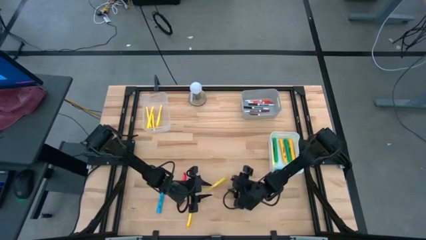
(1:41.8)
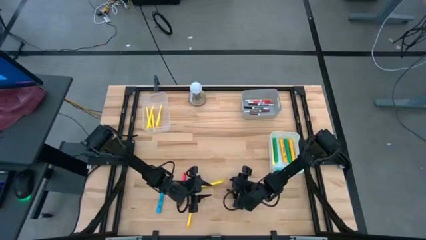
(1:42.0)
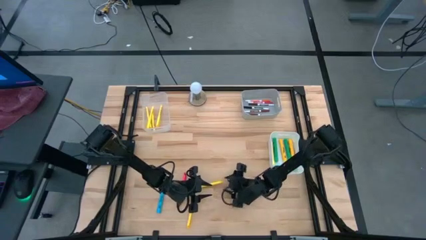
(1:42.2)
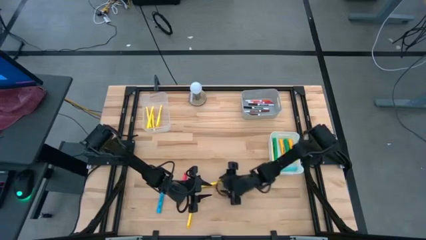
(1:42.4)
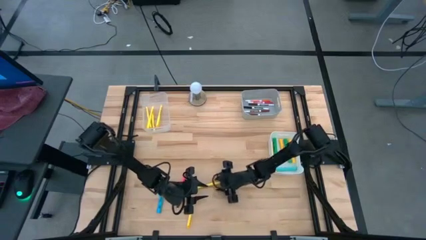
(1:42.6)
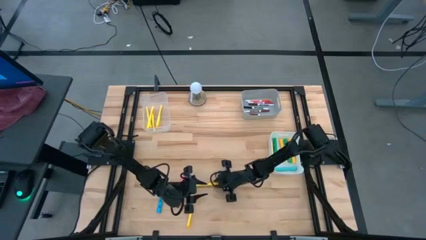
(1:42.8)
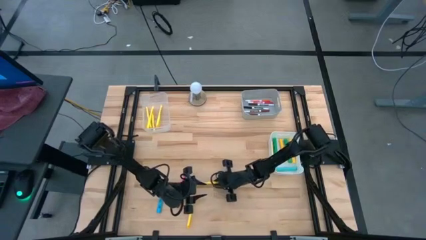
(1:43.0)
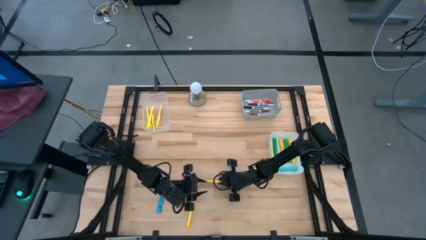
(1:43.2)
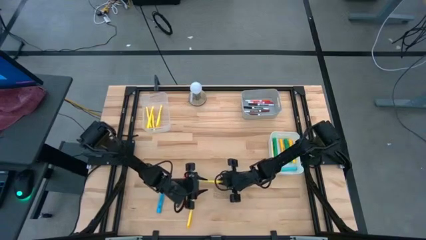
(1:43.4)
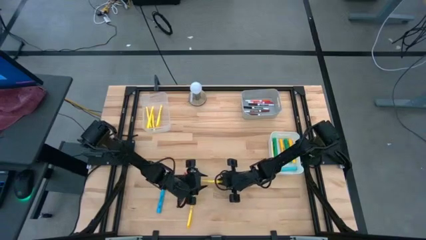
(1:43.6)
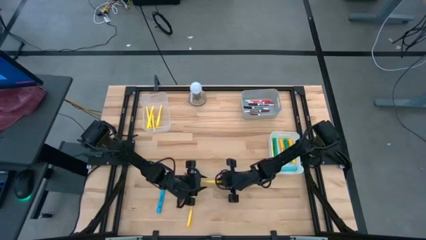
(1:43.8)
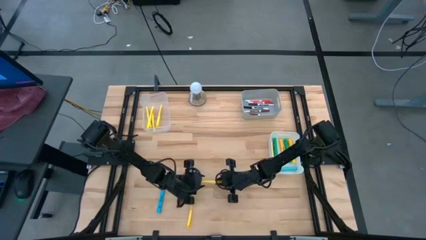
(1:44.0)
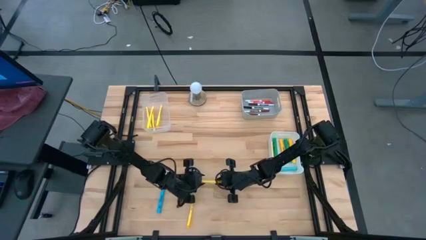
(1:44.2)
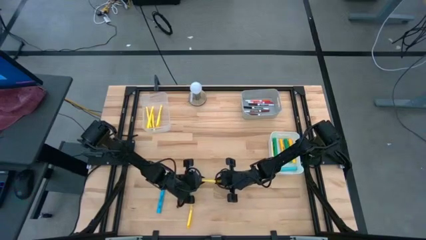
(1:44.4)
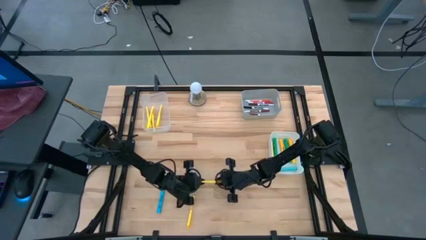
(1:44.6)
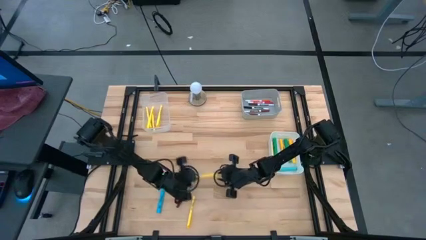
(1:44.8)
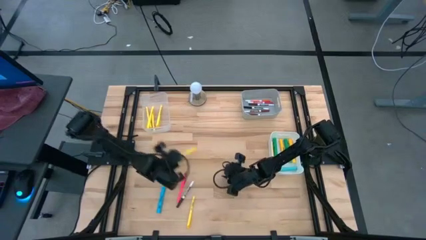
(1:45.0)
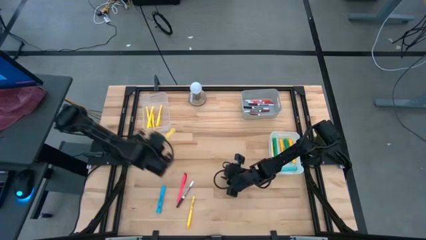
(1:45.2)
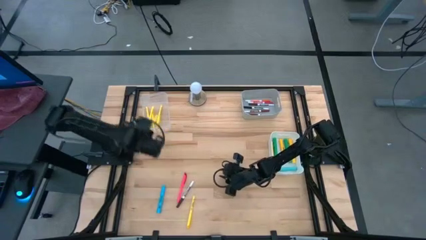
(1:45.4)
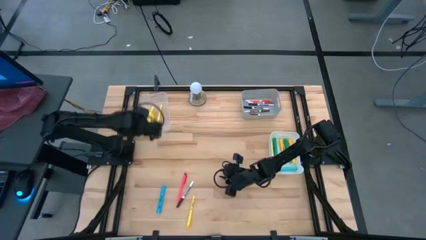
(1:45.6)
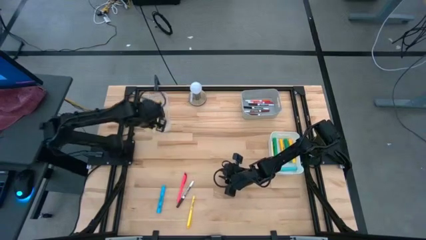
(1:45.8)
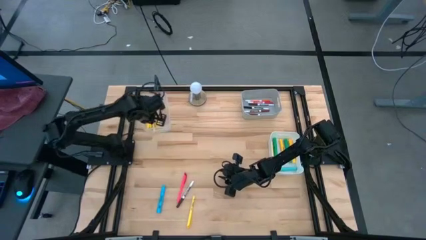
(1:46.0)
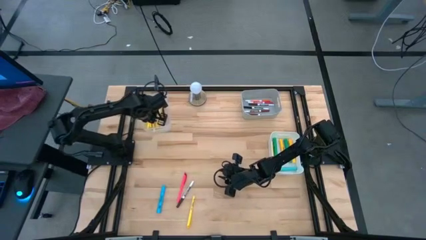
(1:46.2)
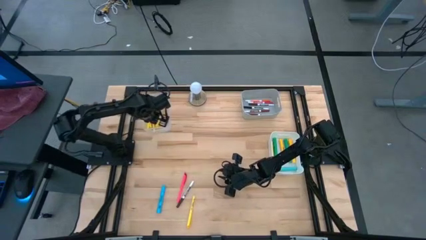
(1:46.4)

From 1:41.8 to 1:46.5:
Task: Pick & Place Markers
Put the yellow pen into the transparent bin

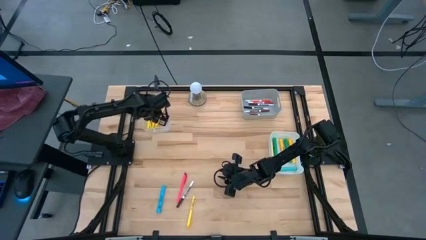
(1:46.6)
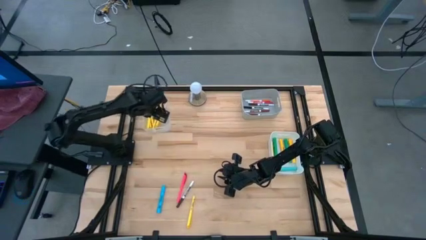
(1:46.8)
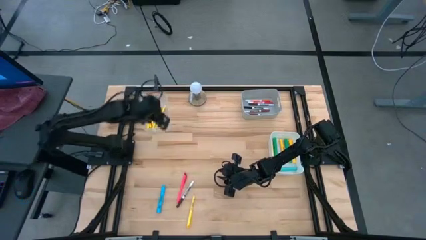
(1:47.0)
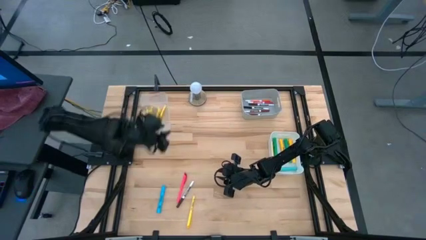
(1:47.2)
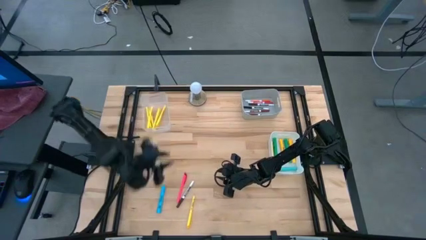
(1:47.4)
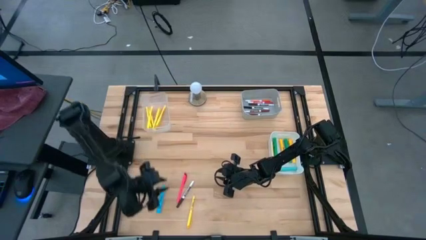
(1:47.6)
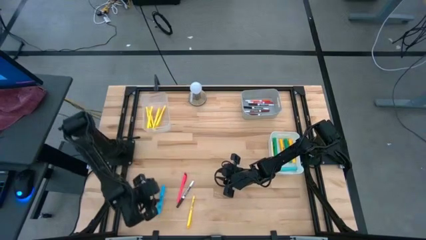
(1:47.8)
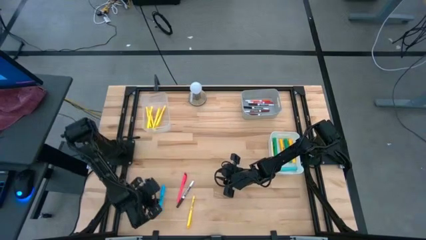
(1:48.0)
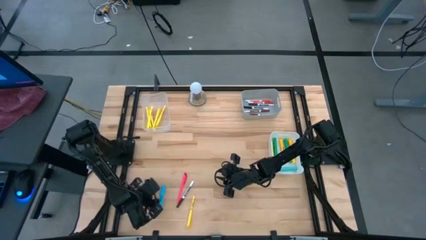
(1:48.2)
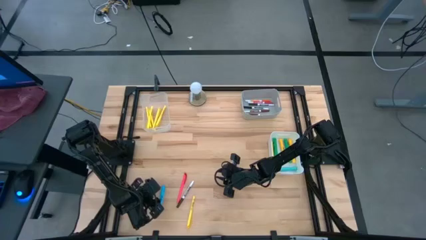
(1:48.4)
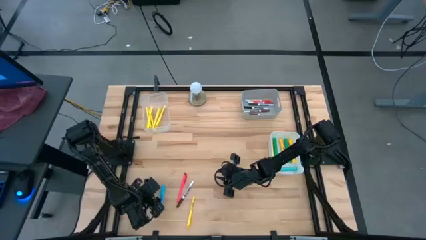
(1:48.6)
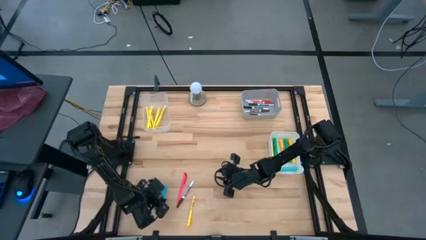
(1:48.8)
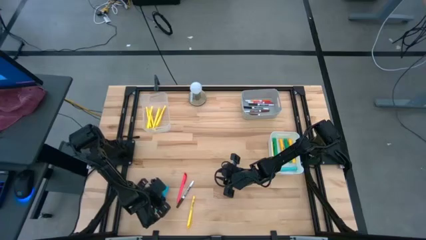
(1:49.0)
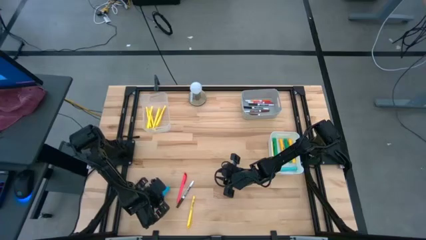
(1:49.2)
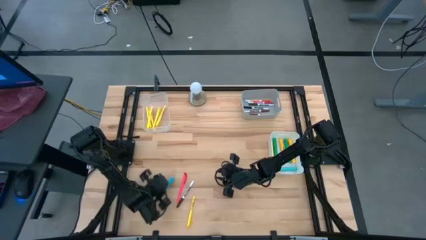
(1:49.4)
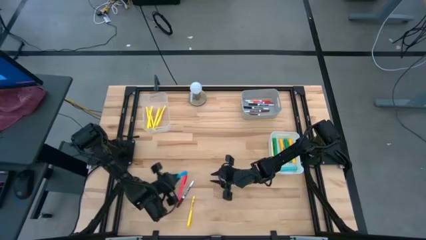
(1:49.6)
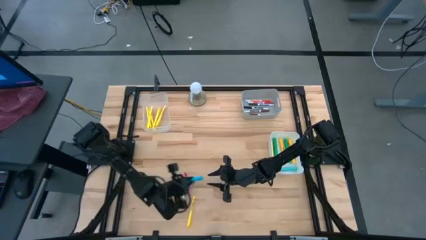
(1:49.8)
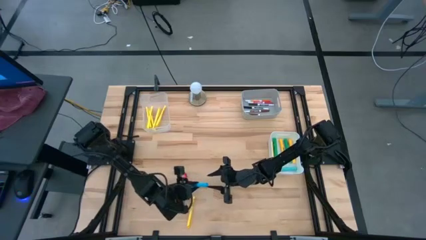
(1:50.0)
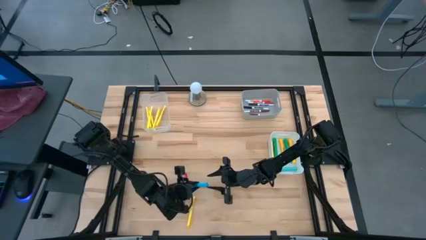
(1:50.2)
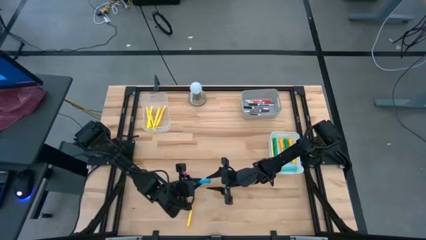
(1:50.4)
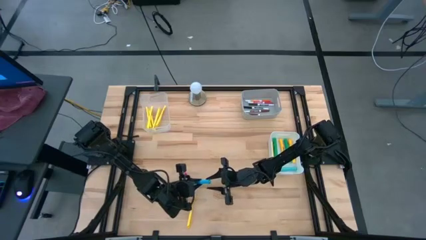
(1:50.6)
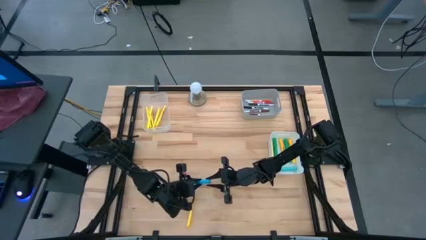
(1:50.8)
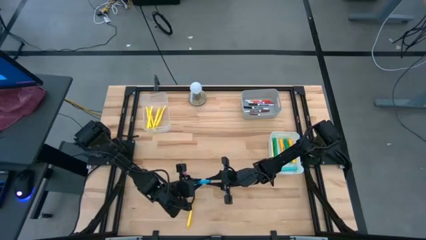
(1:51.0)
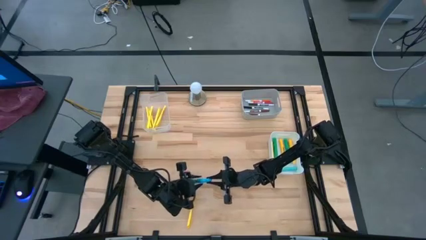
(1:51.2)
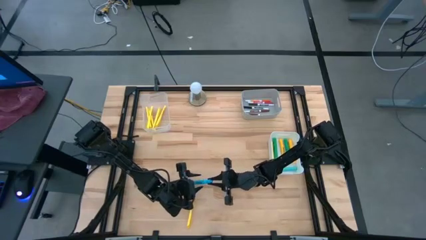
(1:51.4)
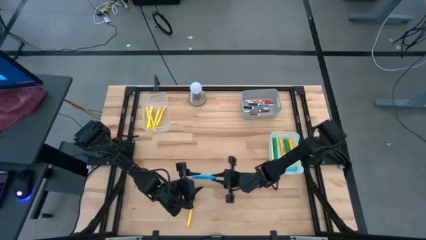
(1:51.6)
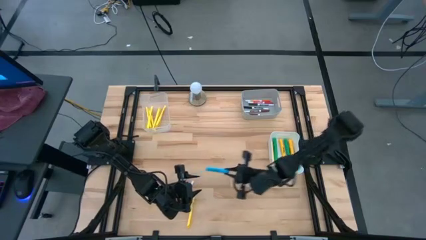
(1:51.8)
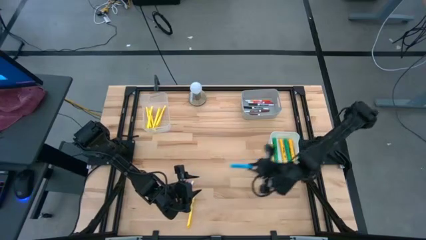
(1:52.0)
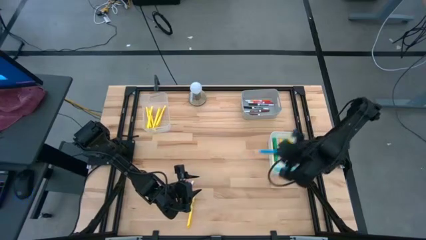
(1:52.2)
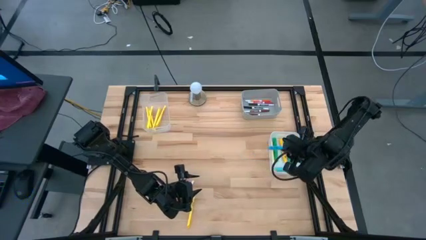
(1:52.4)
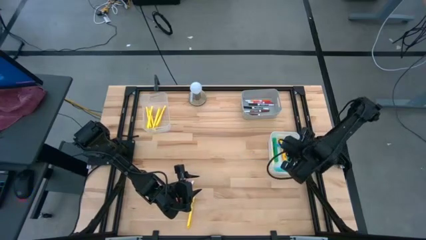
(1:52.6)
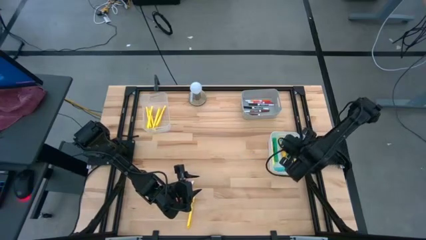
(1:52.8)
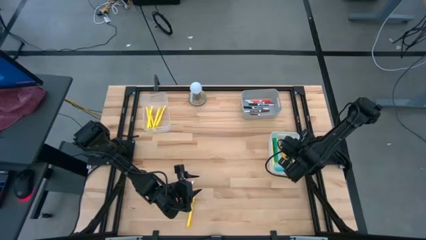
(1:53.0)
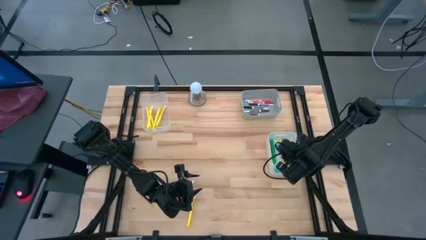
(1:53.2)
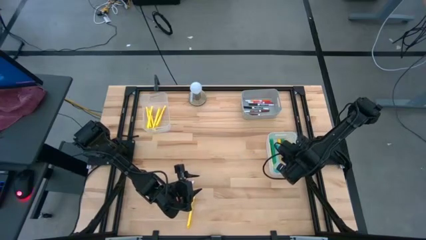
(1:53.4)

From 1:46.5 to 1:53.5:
Put the blue highlighter pen into the white bin

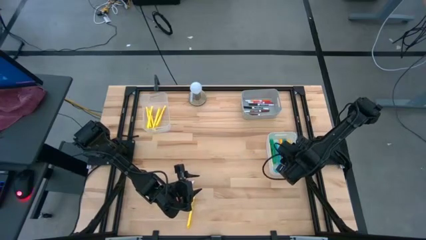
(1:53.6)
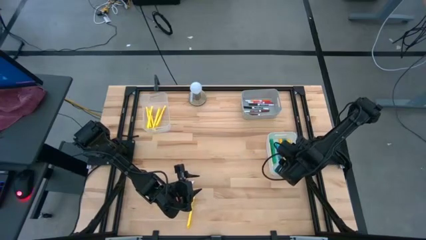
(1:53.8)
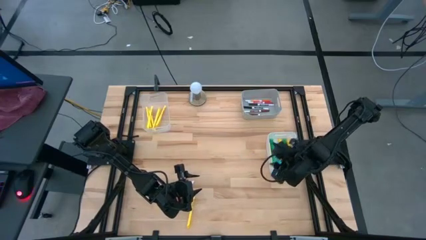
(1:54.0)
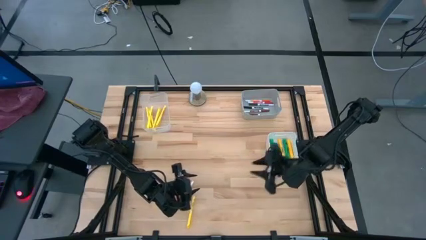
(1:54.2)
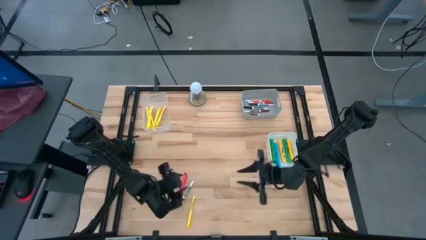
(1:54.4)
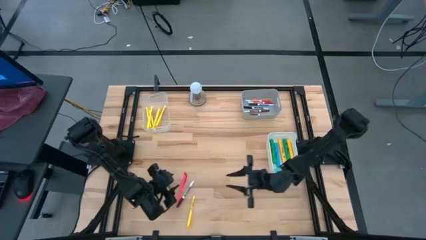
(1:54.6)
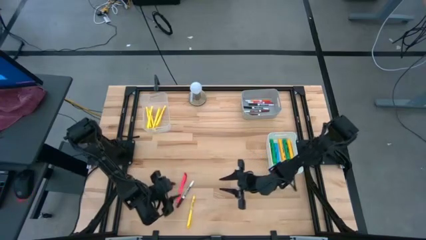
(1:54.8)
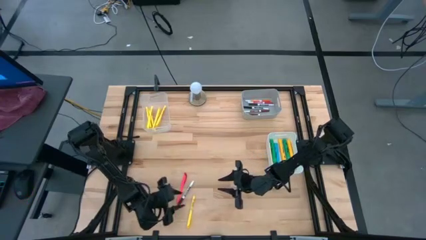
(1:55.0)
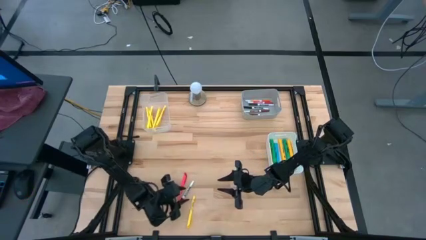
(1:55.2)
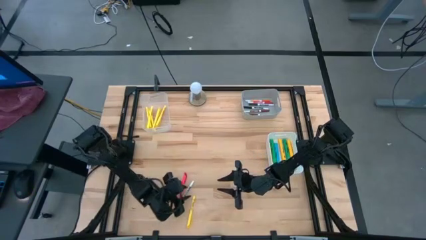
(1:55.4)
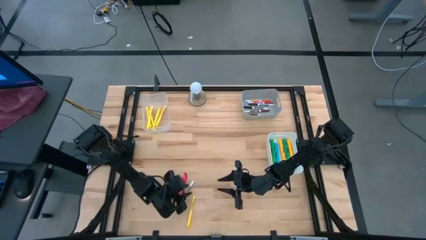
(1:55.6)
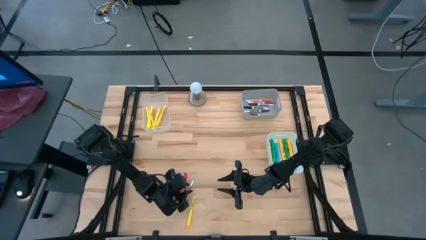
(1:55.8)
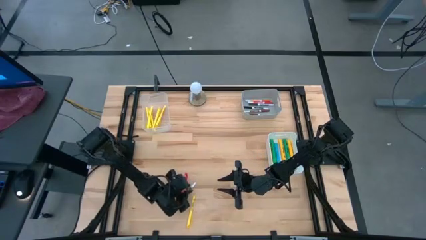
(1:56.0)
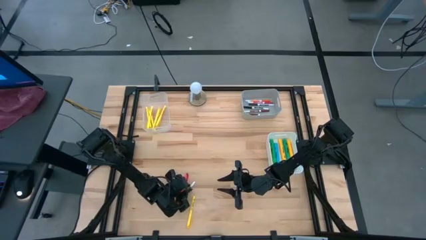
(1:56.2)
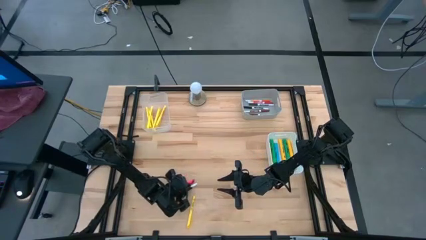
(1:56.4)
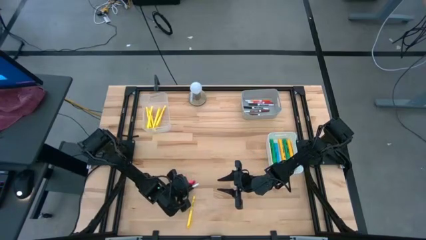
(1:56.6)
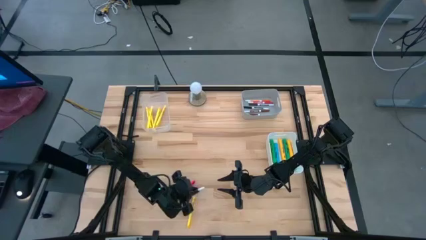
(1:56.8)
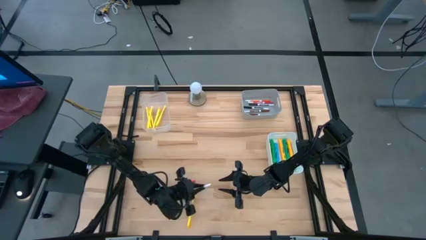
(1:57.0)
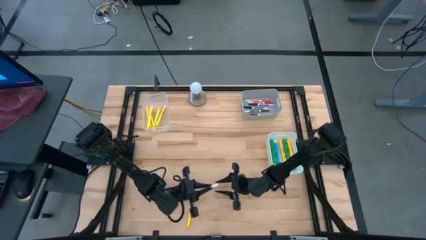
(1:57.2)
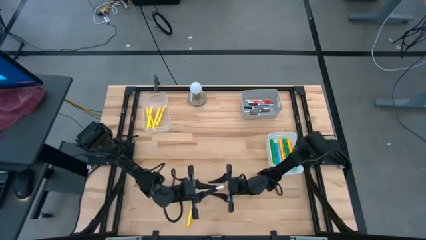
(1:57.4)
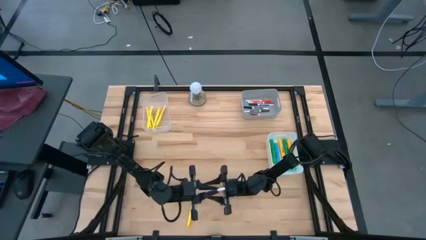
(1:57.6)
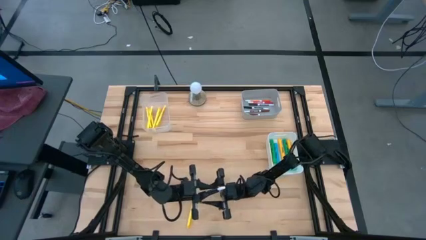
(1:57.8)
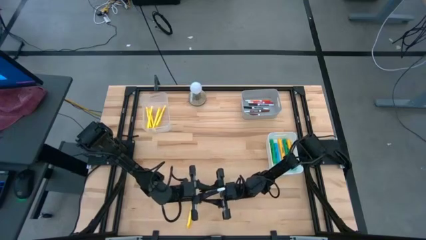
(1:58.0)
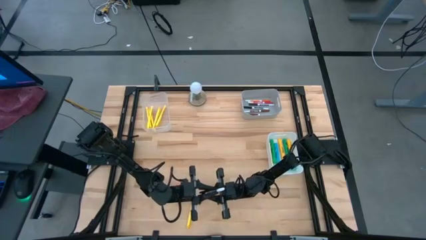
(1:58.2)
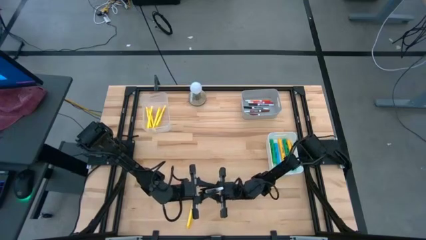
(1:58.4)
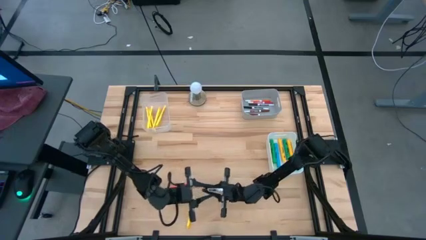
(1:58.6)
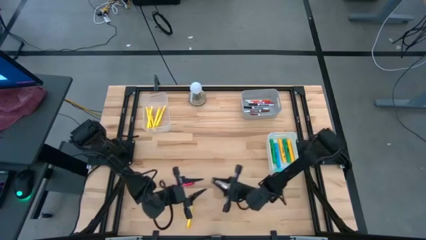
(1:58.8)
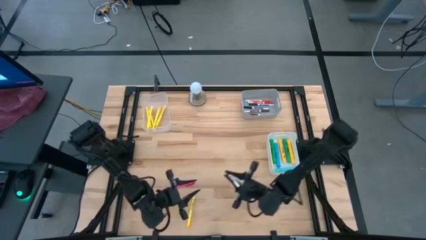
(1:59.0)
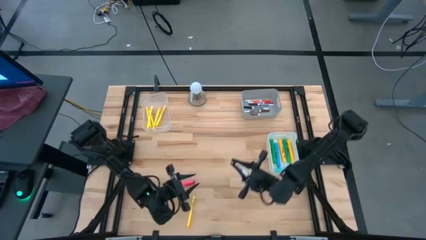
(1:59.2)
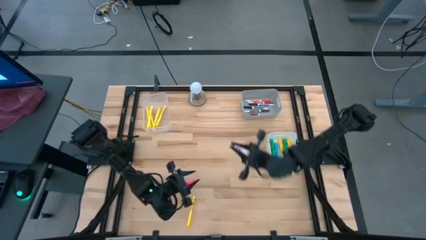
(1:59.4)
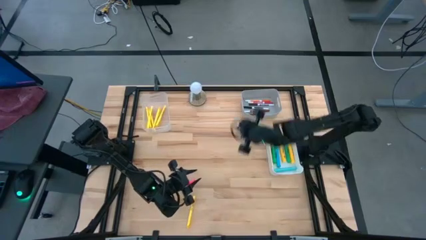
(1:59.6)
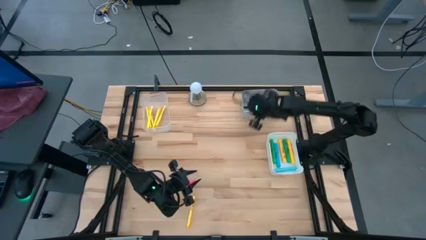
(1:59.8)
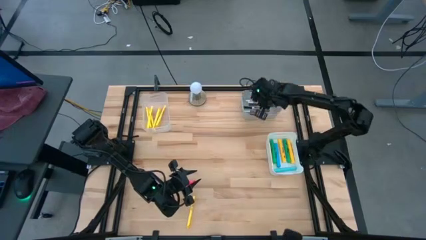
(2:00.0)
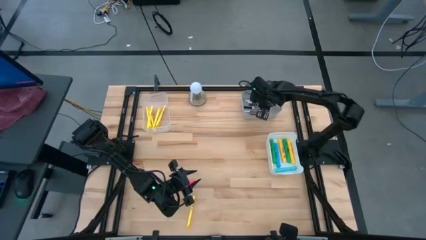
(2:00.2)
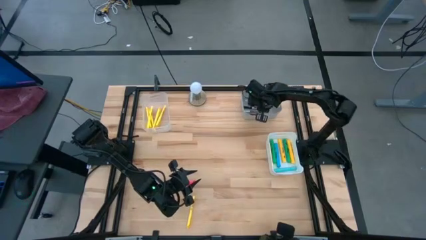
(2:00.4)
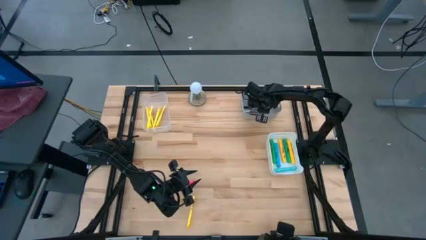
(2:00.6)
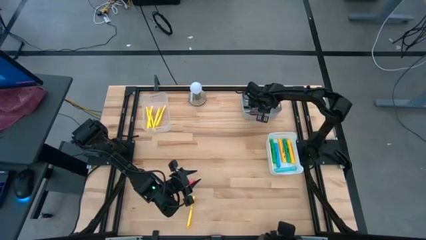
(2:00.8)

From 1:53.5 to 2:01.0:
Put the dark brown marker pen into the gray bin
